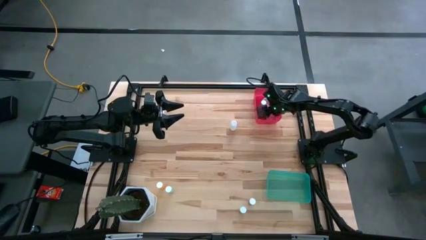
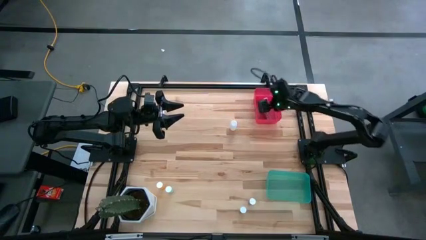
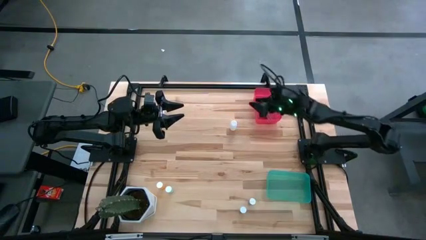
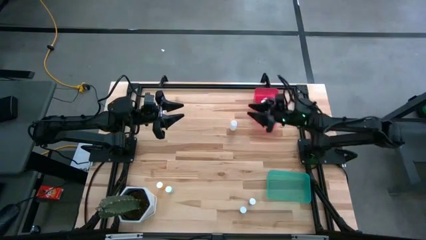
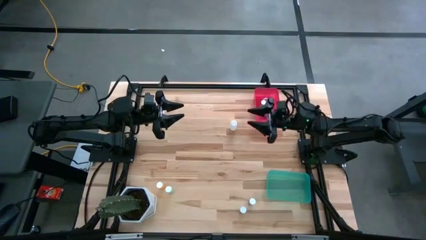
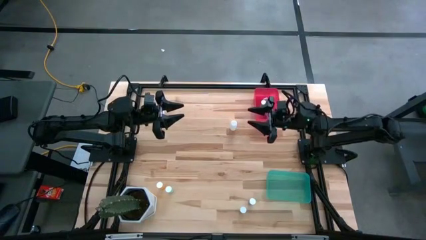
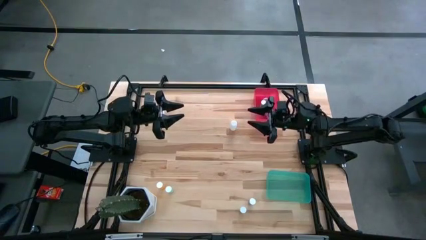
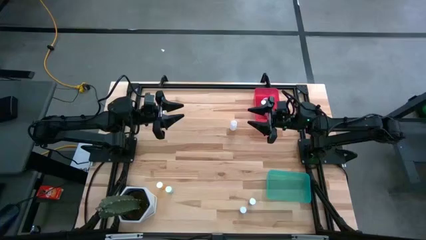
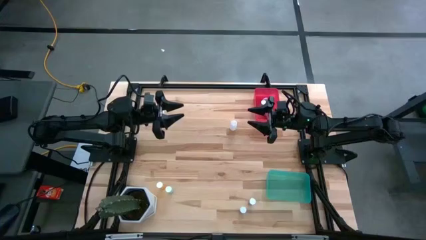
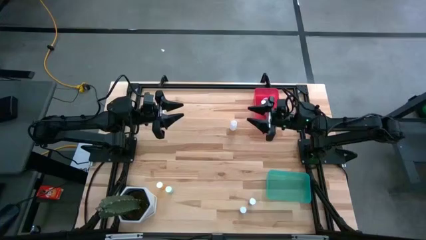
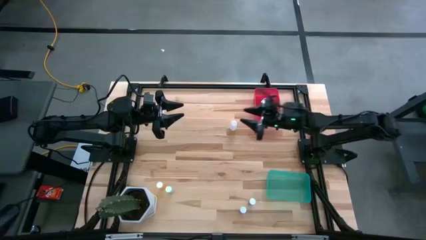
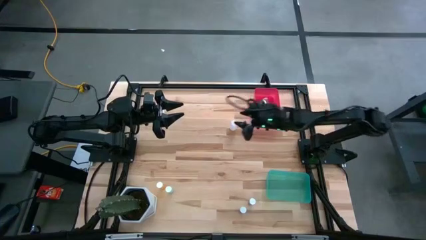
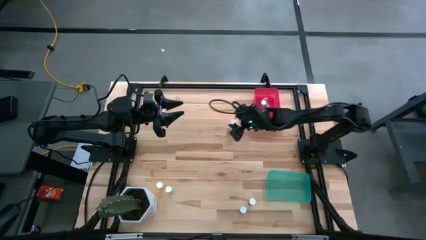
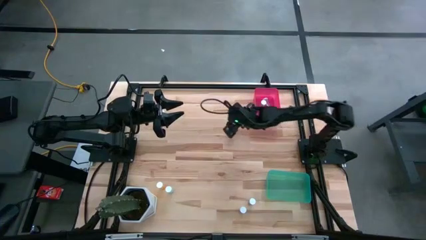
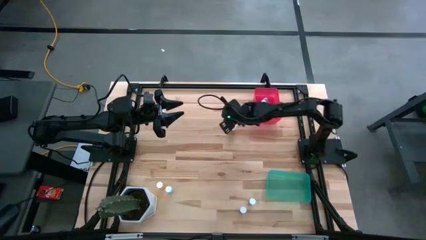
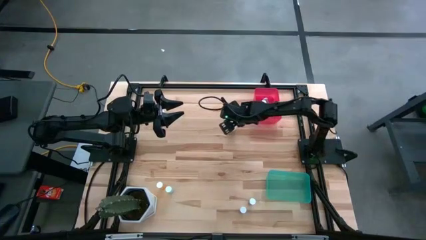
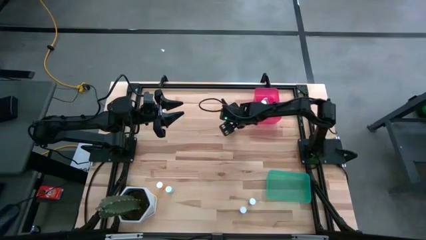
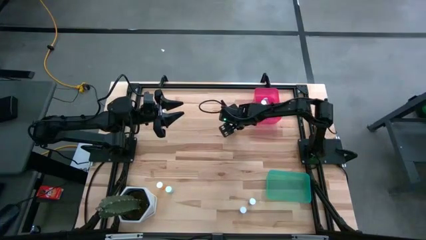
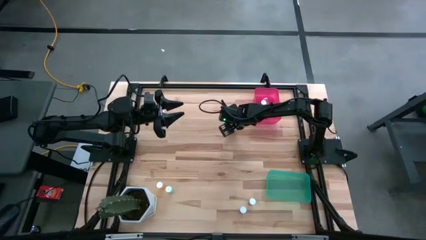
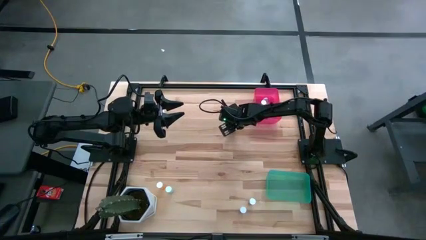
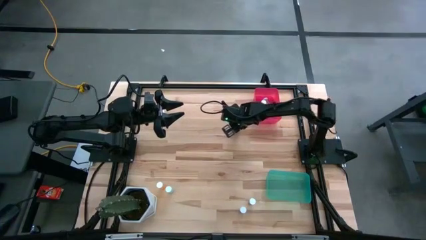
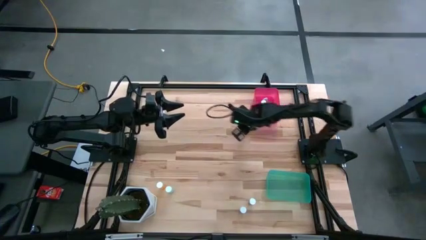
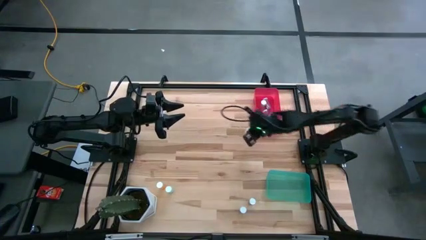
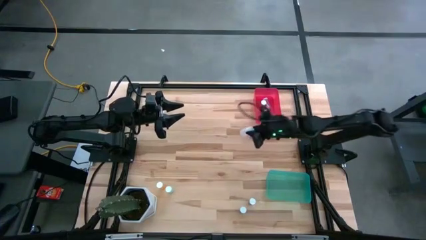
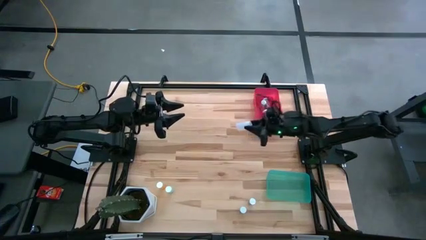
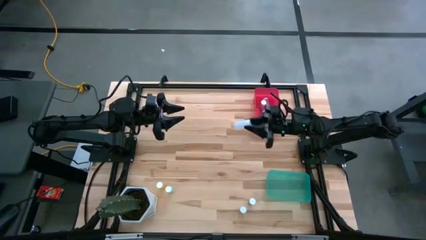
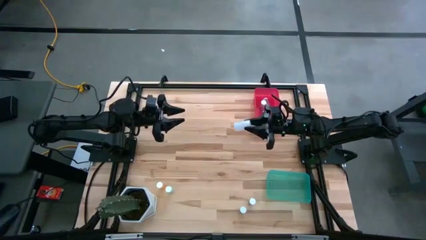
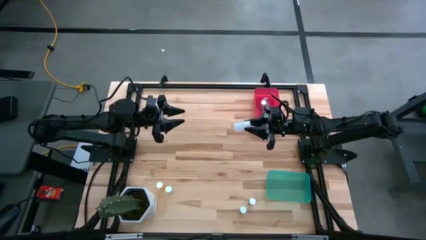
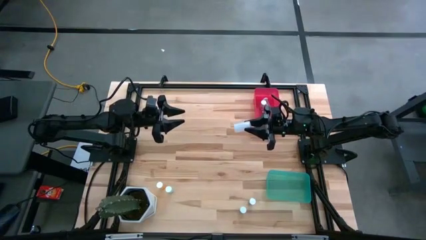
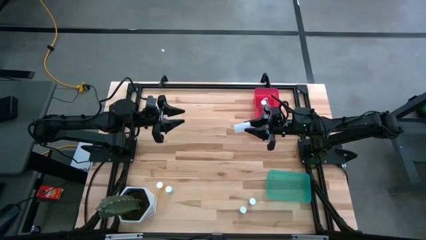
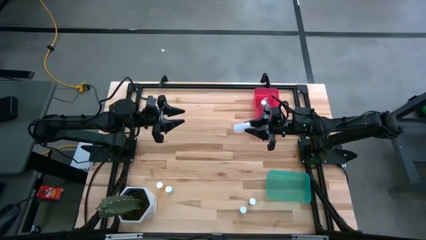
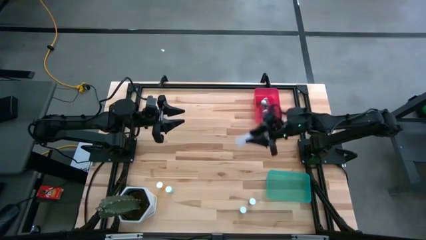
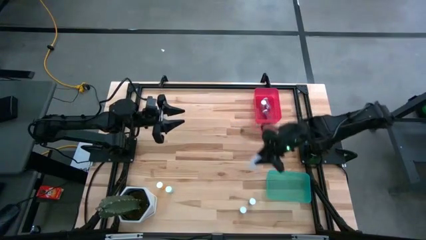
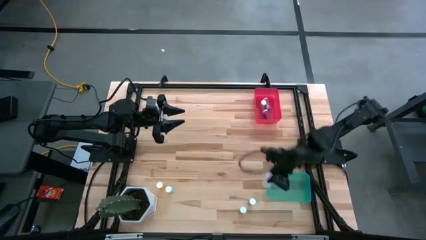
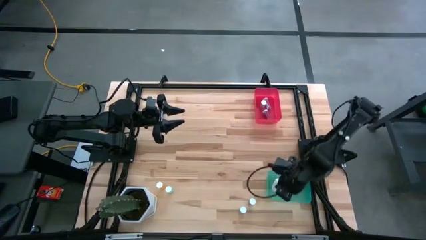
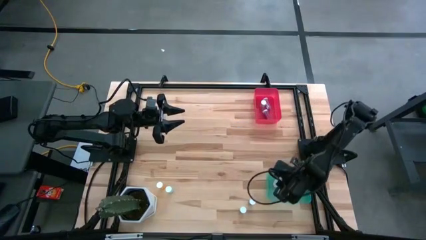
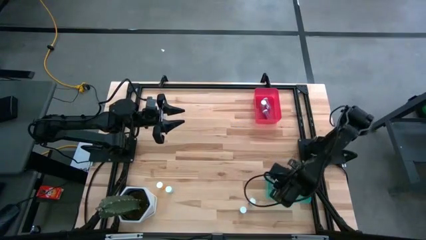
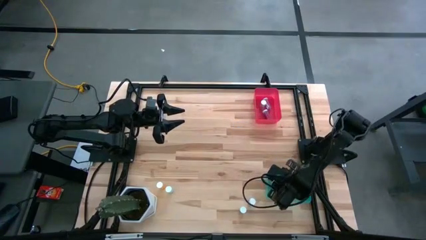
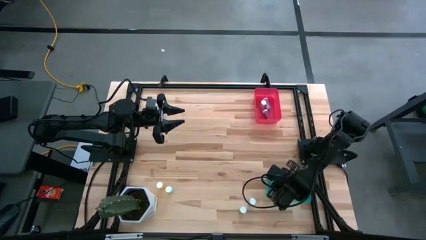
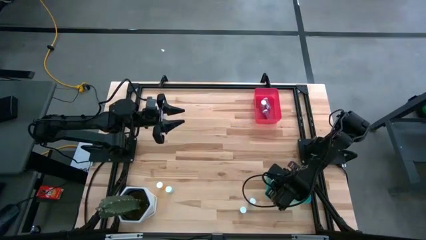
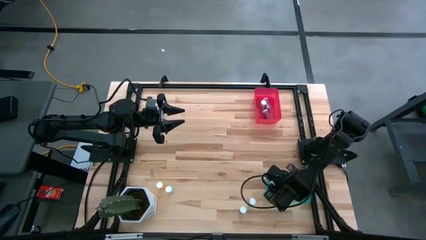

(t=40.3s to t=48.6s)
Task: Pick and place medicine bottles into bin by pill shape (circle, oval)
Put the white tablet bottle into the green bin

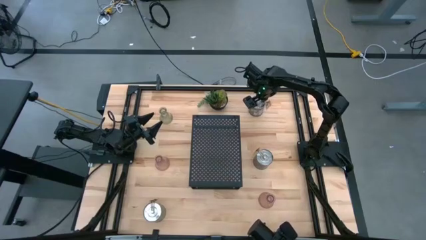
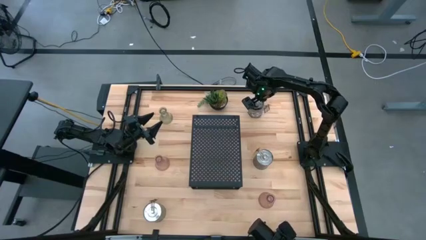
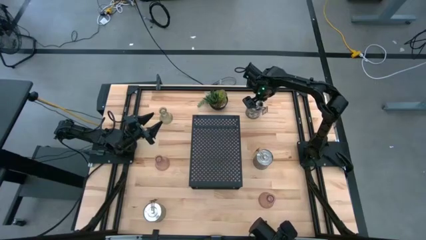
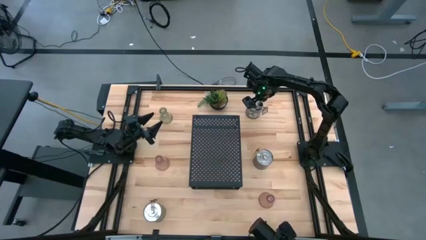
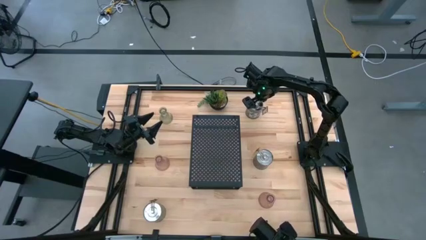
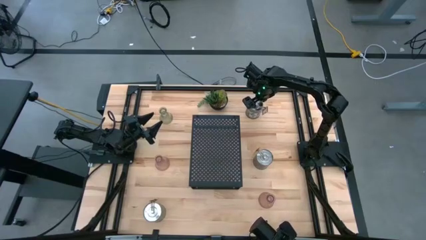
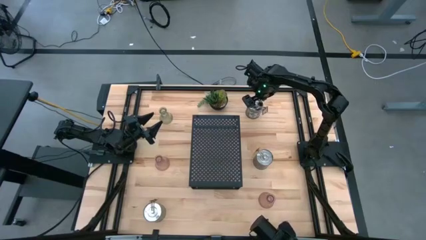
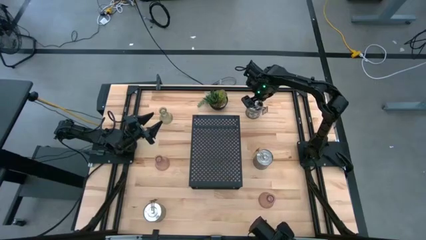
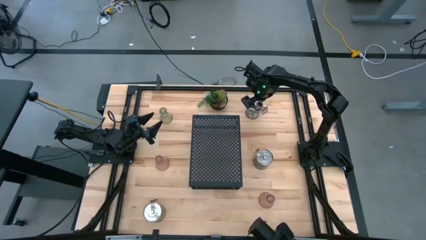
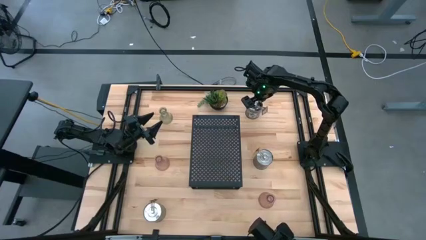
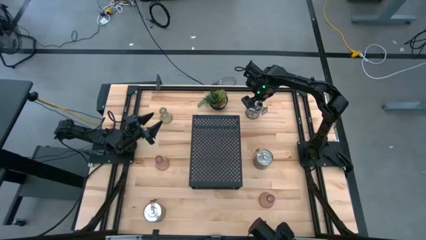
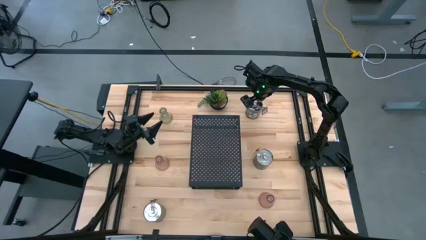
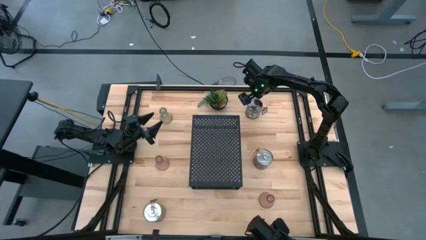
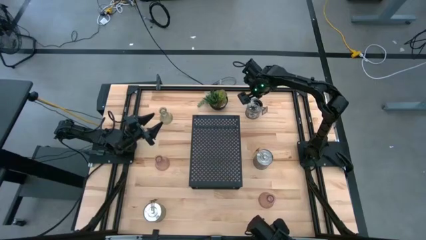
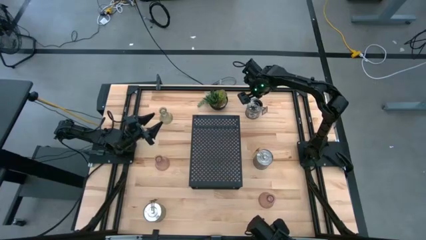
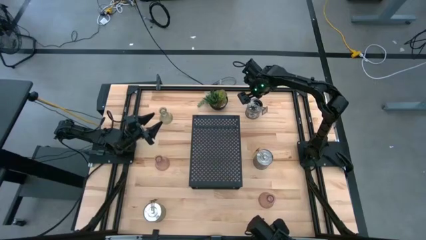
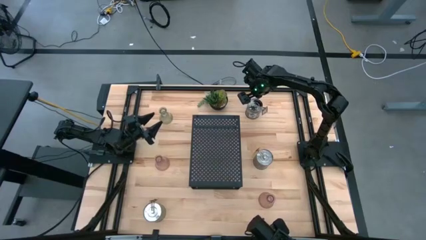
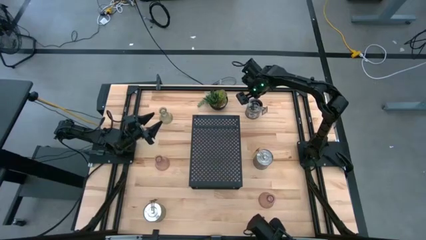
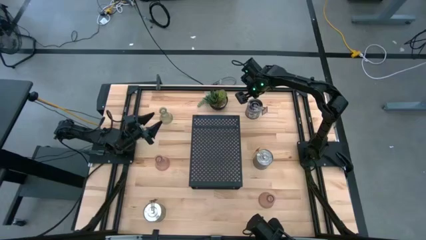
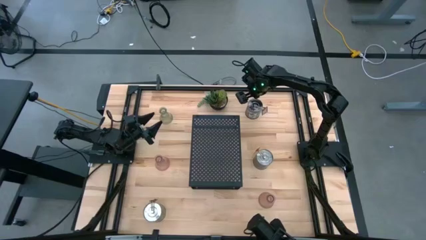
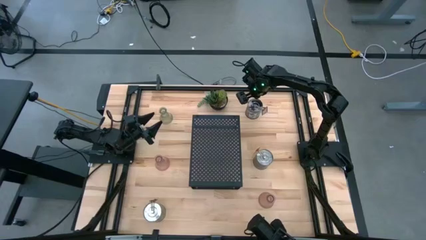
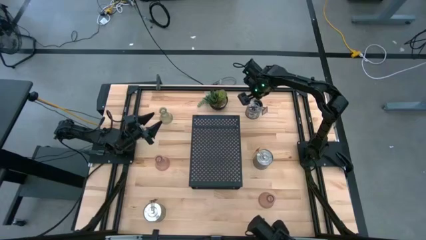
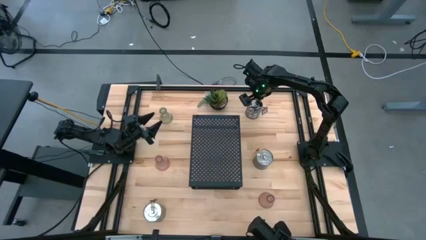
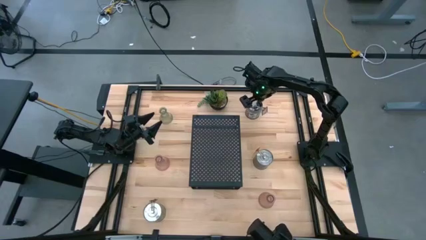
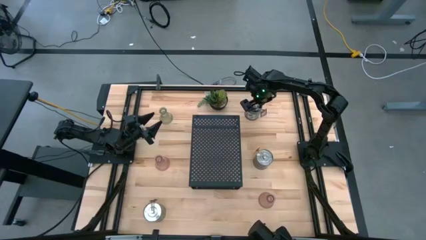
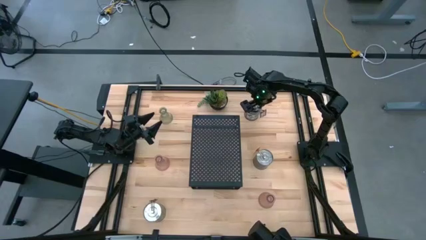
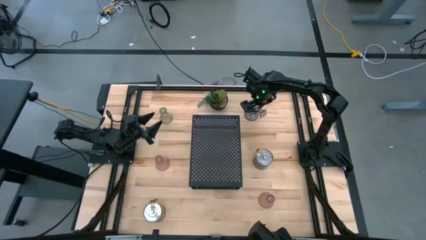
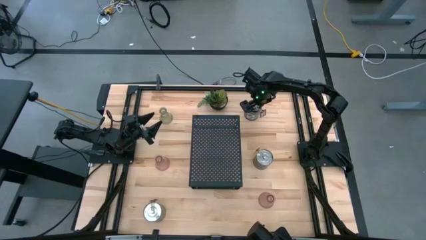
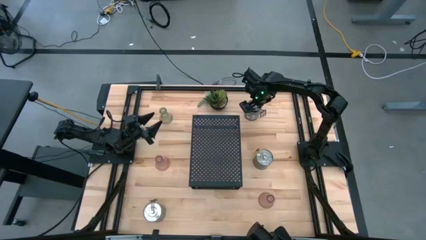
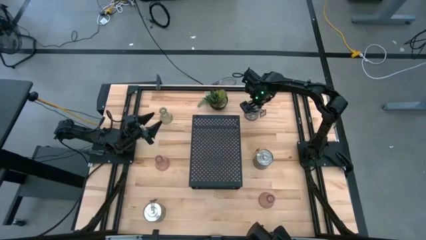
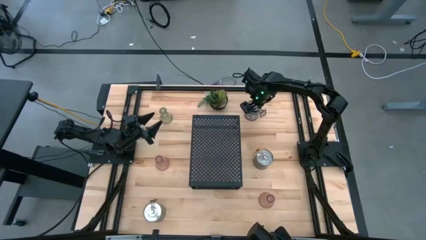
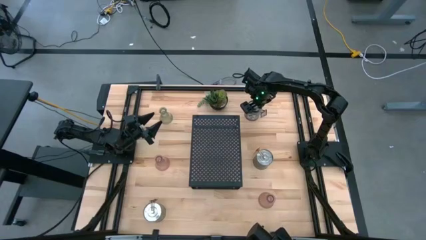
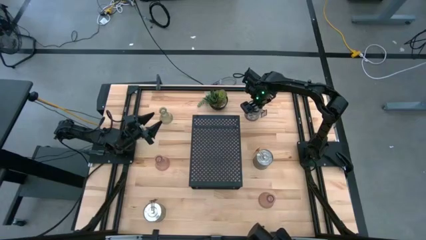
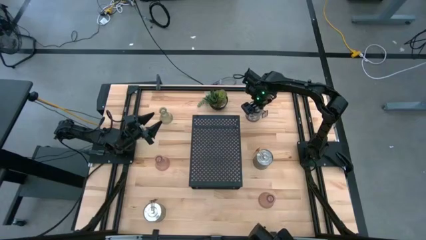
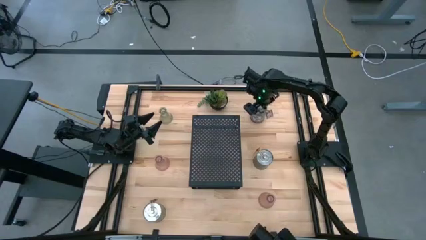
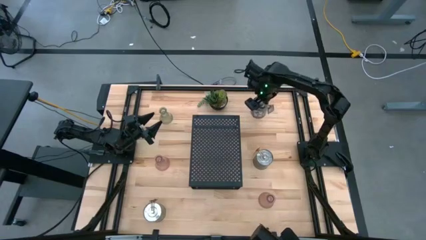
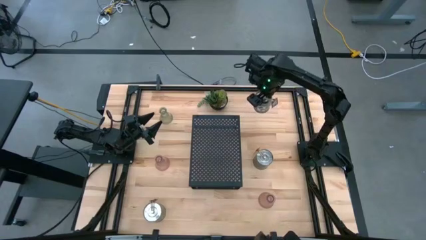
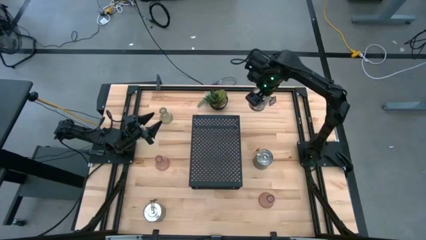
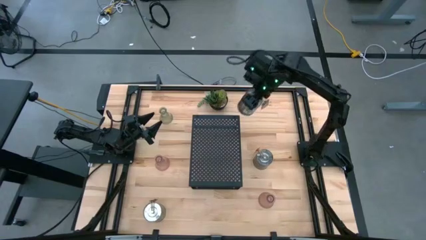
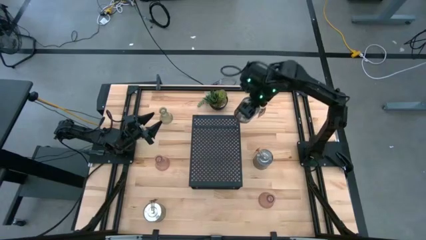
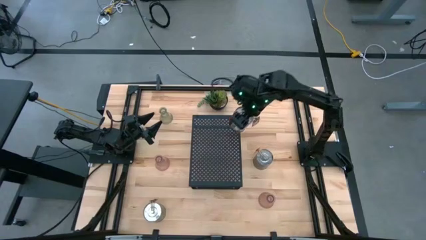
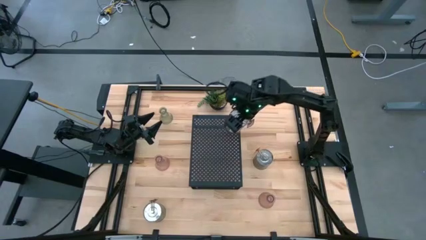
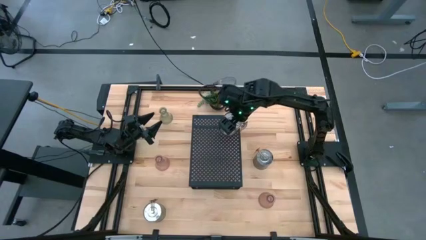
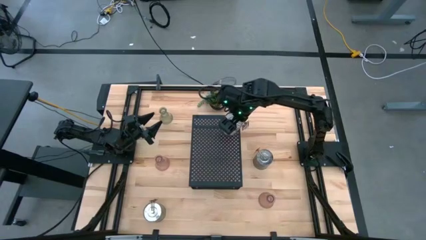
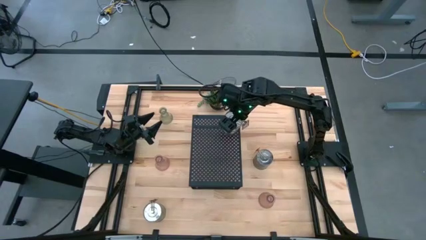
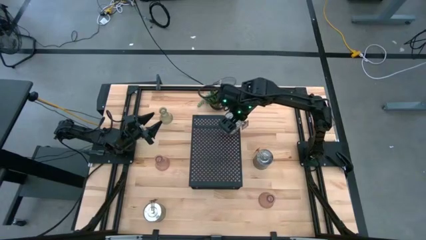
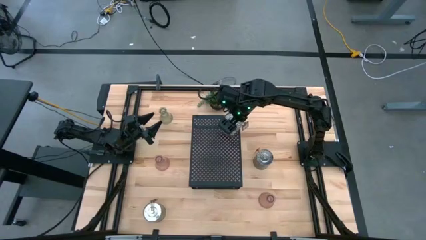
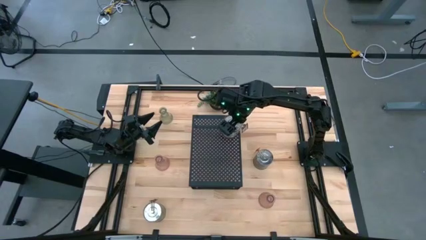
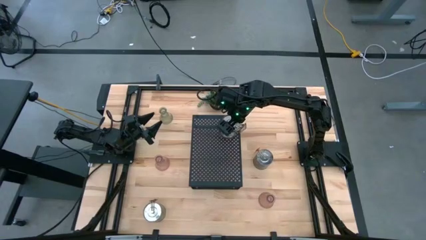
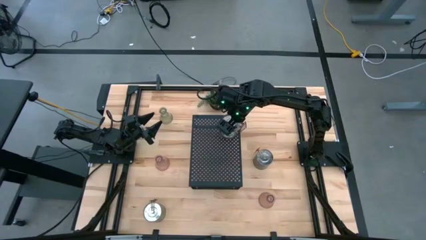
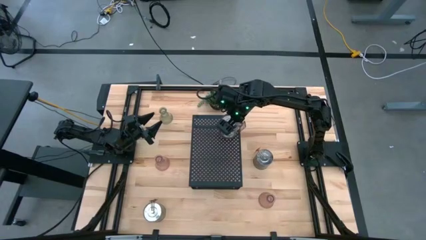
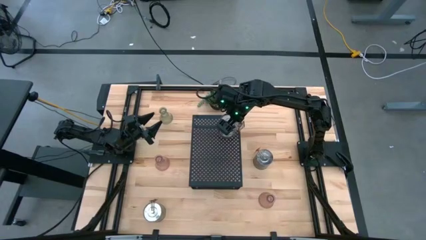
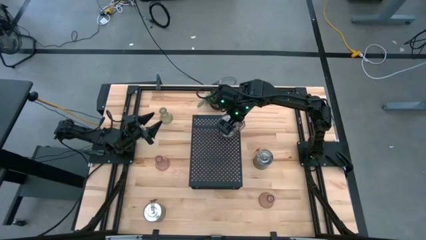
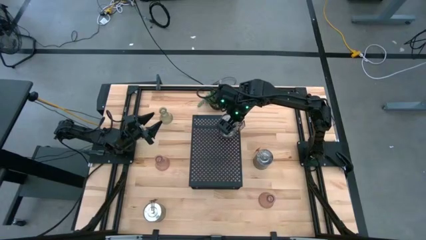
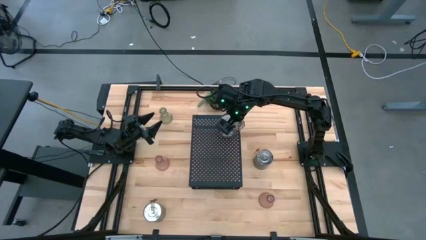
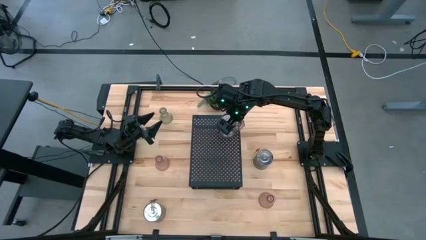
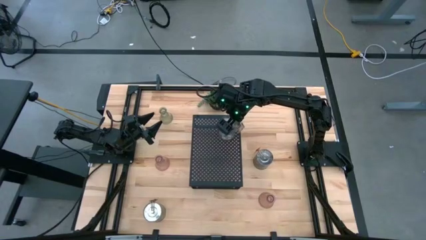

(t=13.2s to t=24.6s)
Task: Pick & Place candle stick holders
Put the top scented candle can on the shelf
